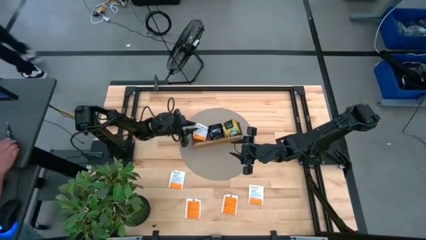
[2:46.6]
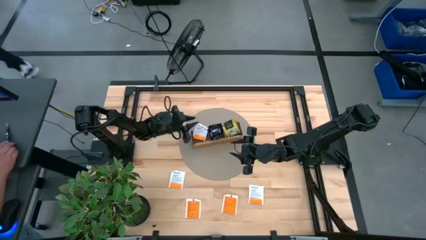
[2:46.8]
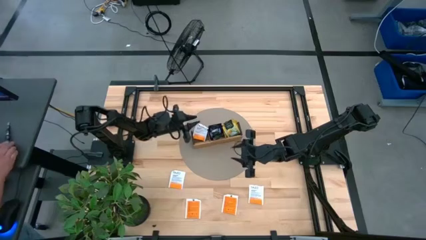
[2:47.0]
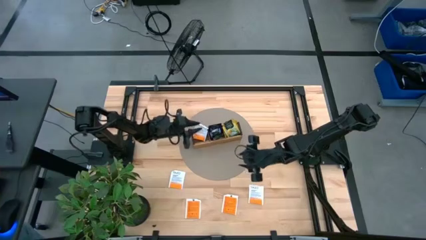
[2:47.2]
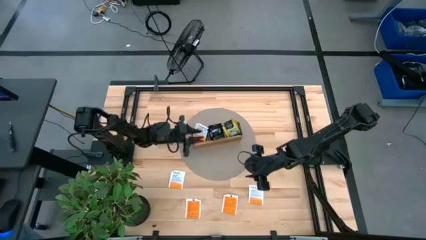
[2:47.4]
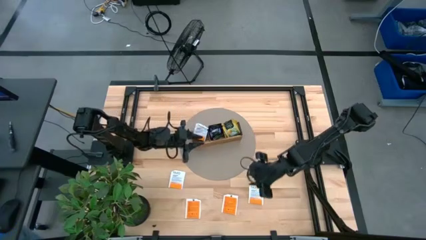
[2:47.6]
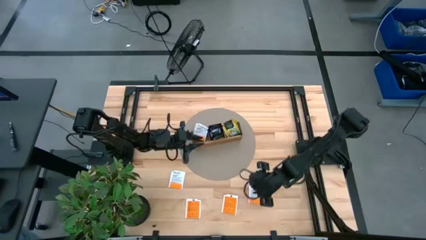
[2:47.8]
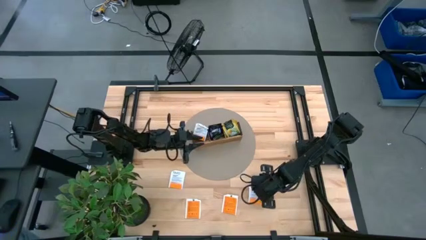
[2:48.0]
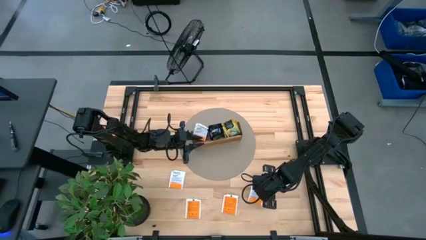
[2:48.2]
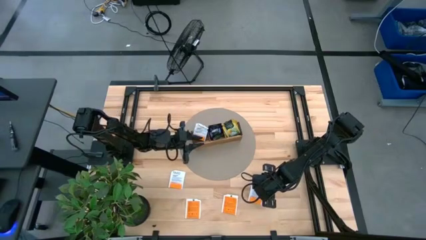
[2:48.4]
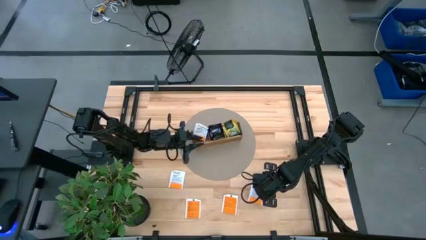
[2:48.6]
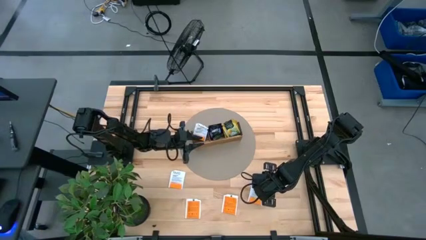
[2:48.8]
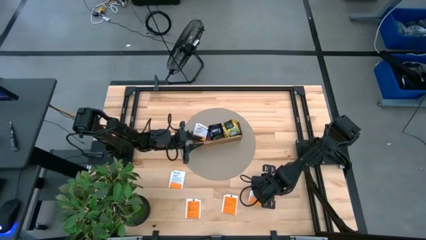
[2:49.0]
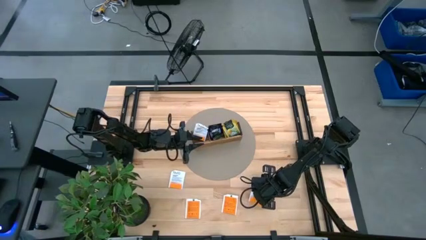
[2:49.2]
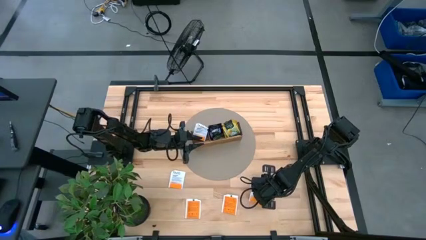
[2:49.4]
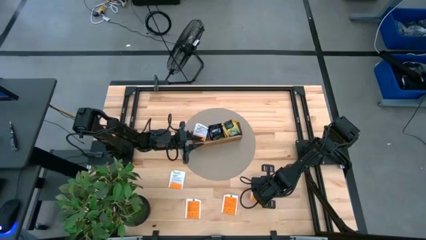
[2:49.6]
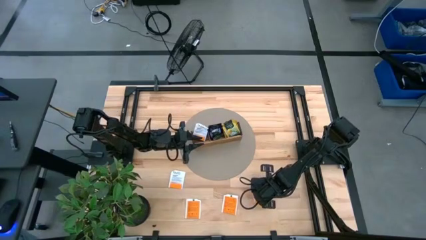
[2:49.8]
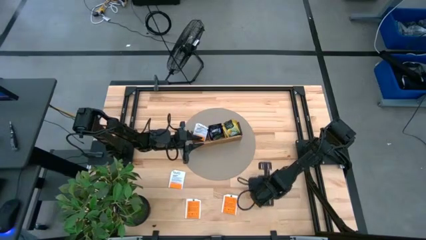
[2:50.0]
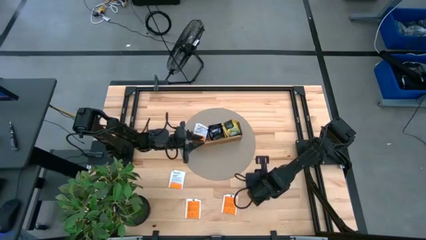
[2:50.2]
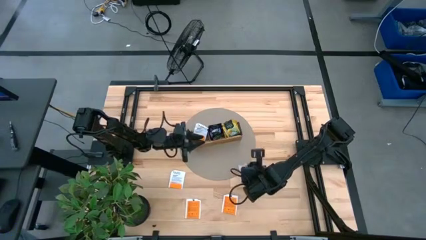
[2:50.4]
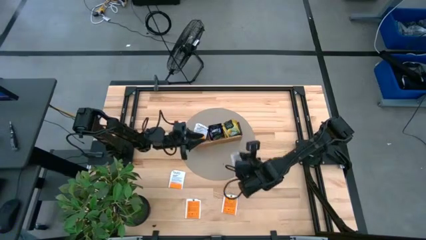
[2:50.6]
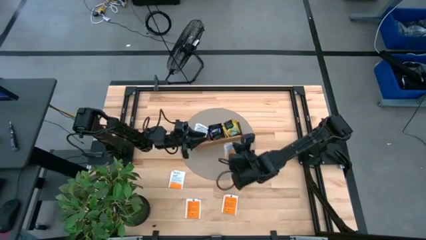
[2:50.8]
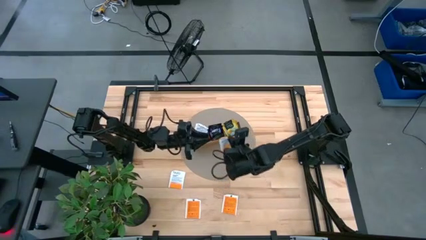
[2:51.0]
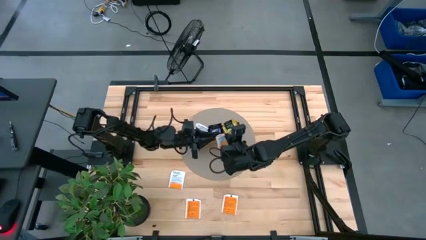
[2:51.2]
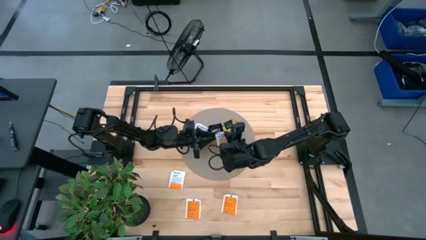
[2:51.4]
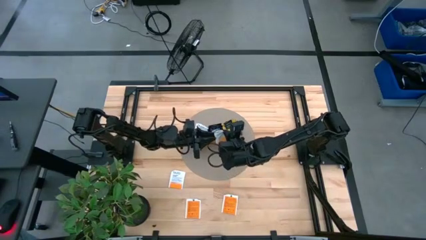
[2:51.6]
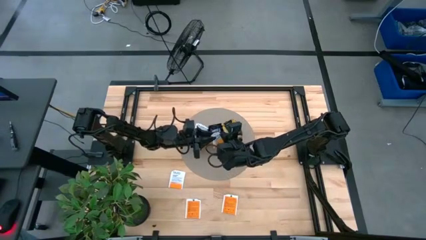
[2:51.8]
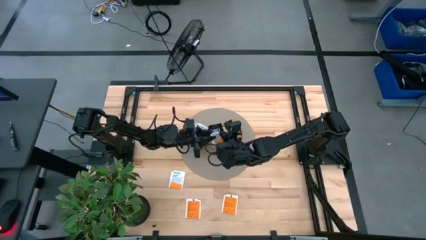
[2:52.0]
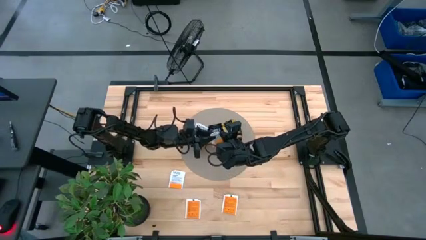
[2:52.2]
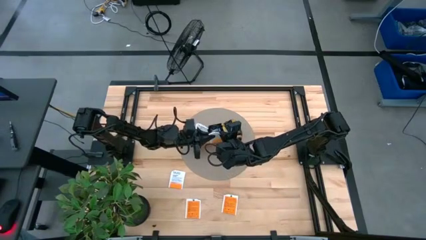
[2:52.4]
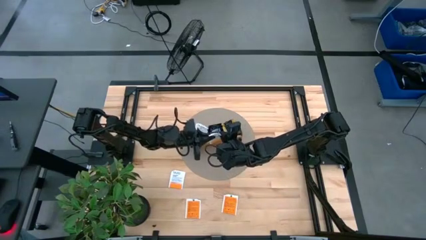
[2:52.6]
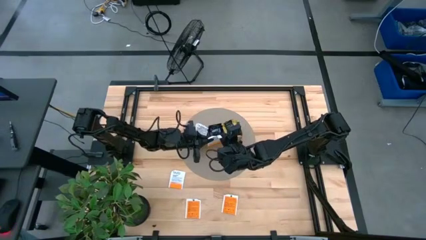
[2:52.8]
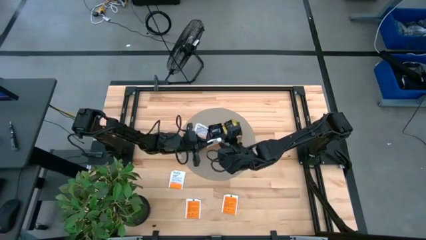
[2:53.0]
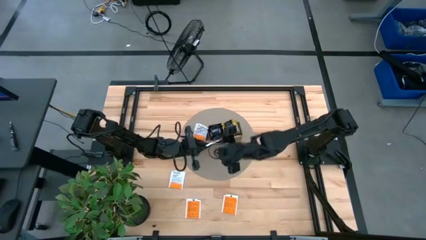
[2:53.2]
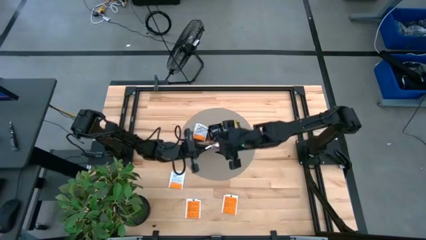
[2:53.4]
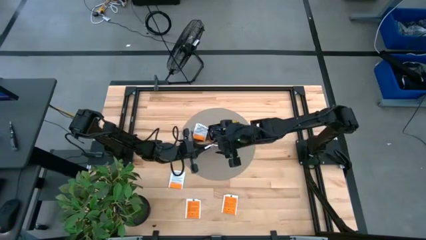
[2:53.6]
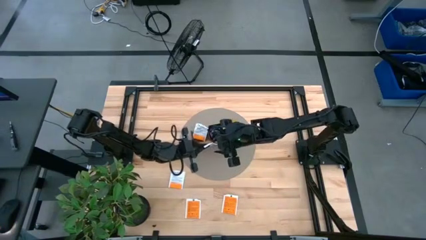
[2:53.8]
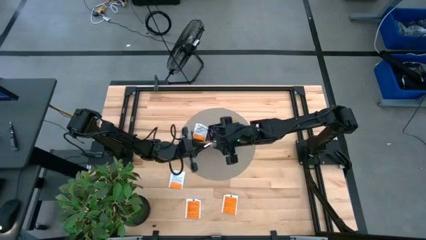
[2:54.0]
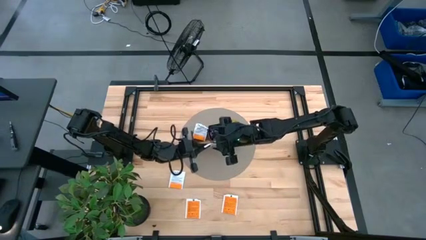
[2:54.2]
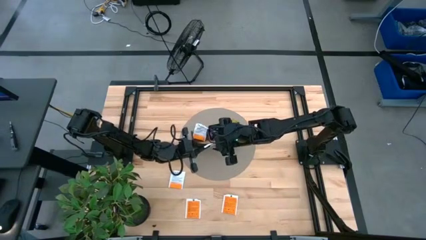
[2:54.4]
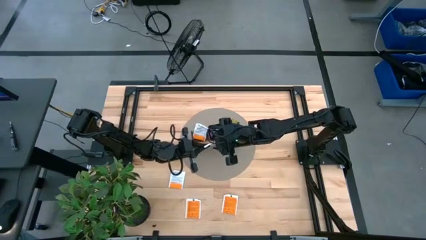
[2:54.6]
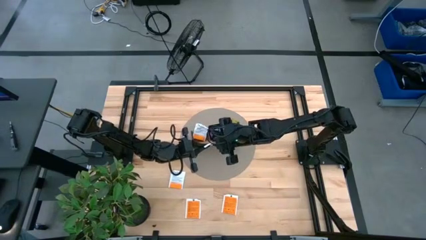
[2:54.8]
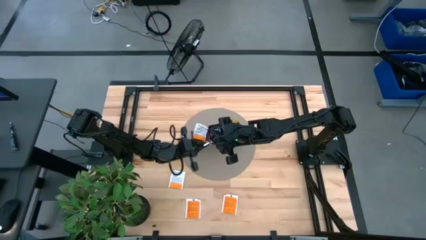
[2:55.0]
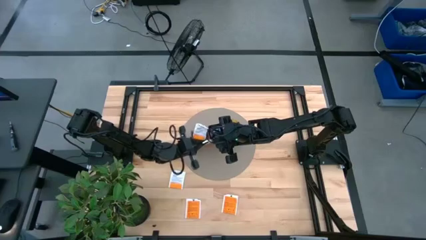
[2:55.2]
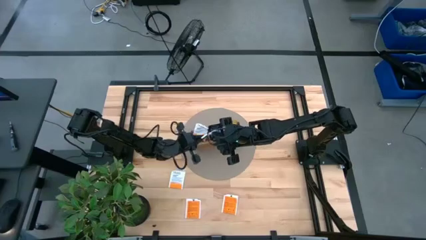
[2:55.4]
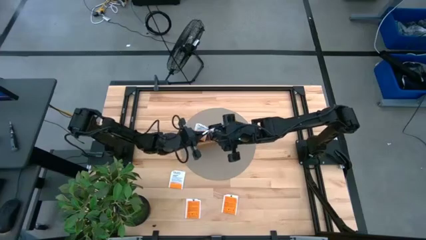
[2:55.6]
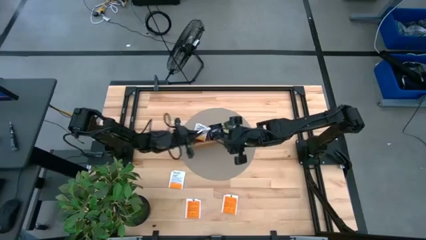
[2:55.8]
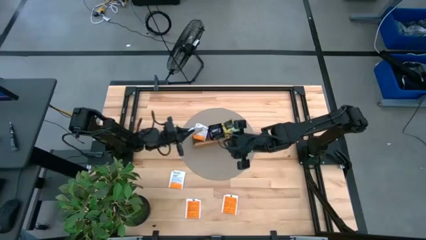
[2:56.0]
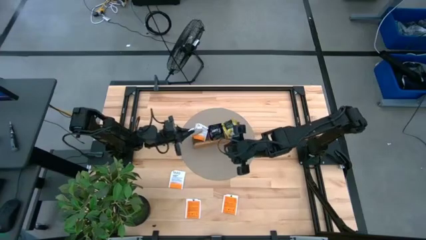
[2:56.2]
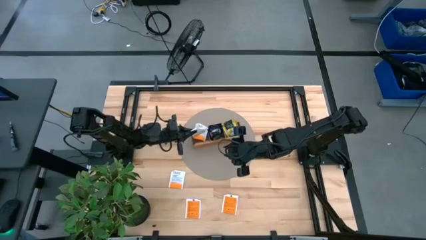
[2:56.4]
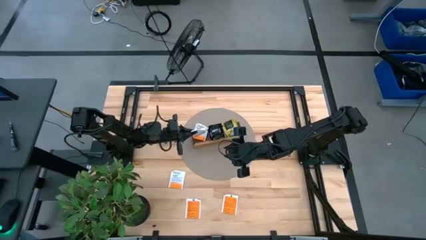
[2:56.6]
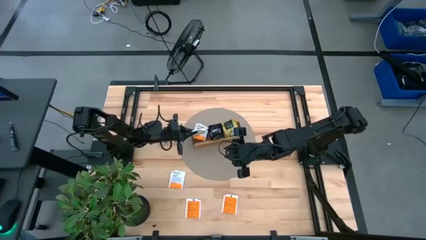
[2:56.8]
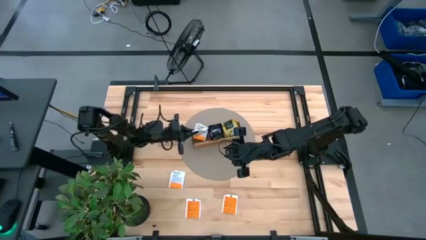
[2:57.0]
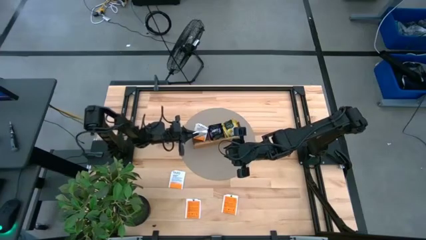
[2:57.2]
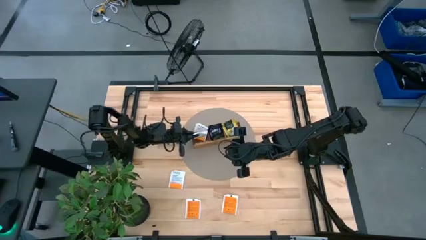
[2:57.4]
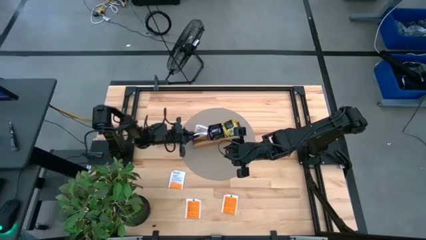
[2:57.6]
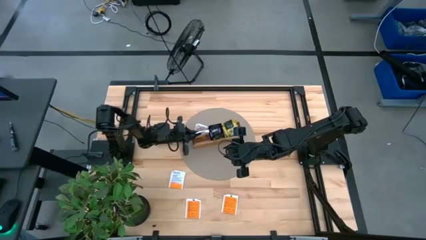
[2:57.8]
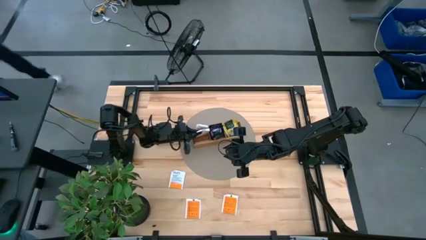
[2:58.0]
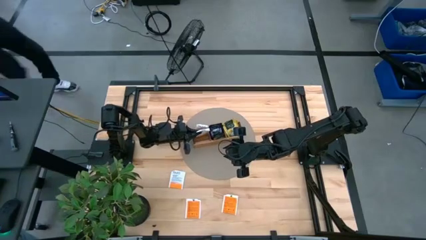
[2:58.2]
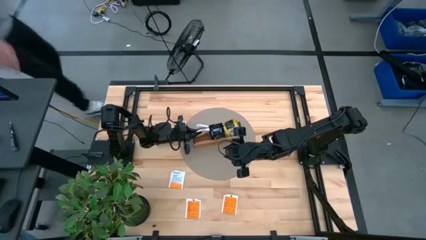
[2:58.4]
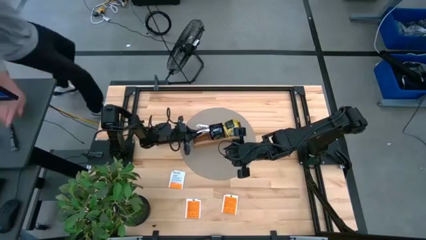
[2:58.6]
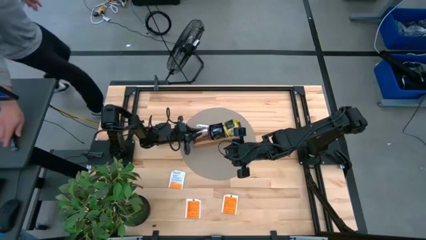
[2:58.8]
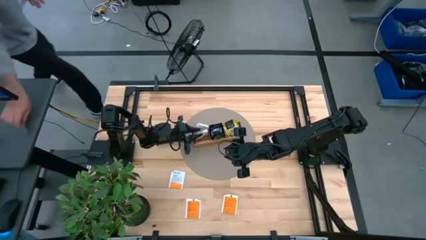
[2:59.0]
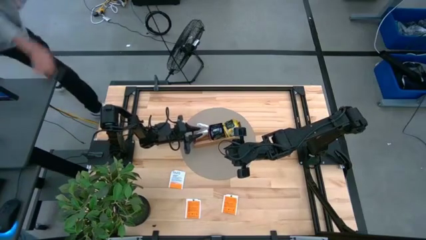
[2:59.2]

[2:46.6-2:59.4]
Task: Pick & Place Tea
Put the white tea bag into the left section of the wooden organizer

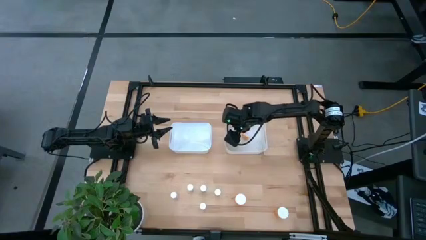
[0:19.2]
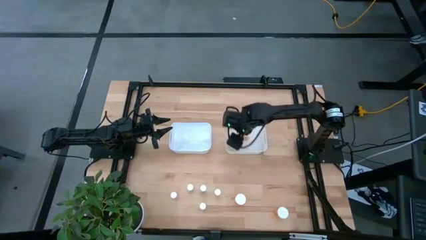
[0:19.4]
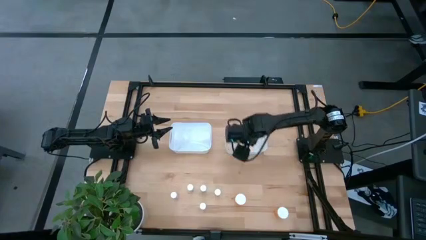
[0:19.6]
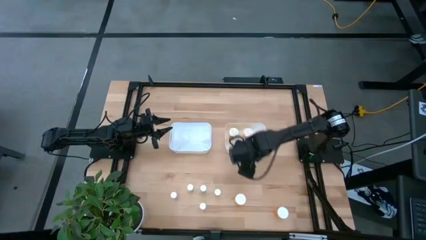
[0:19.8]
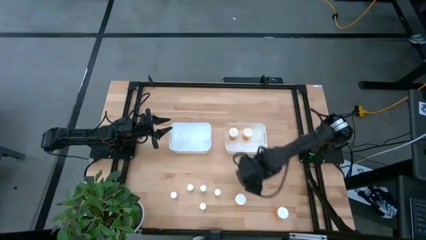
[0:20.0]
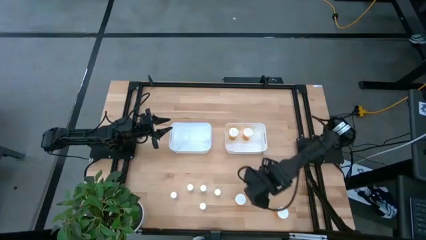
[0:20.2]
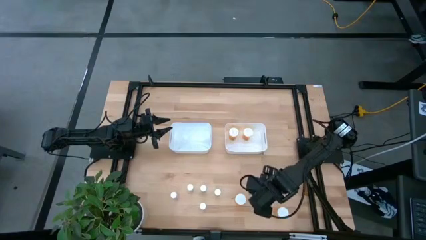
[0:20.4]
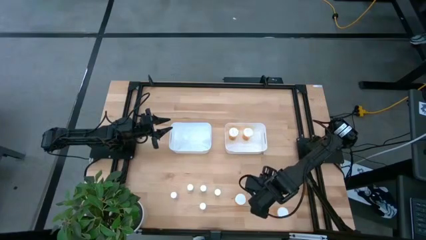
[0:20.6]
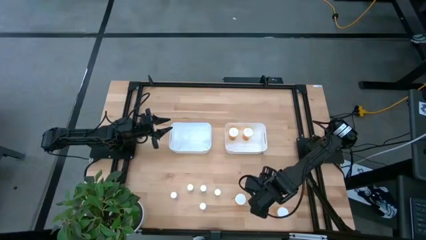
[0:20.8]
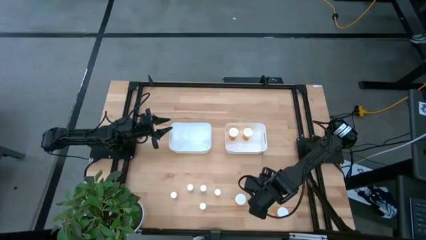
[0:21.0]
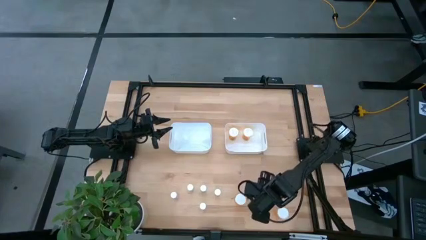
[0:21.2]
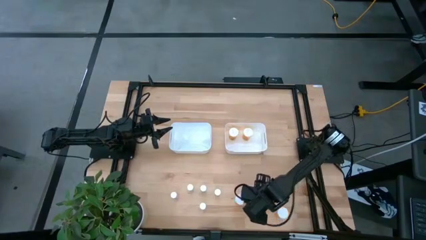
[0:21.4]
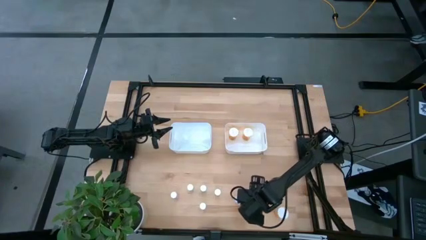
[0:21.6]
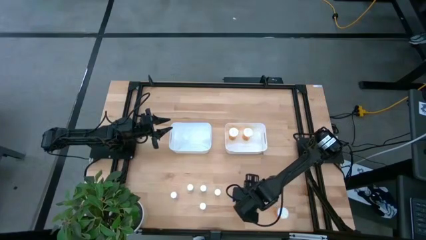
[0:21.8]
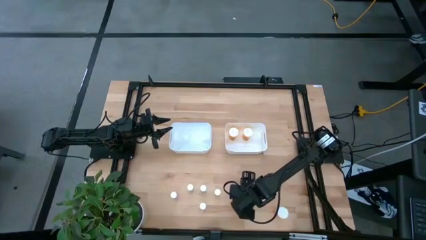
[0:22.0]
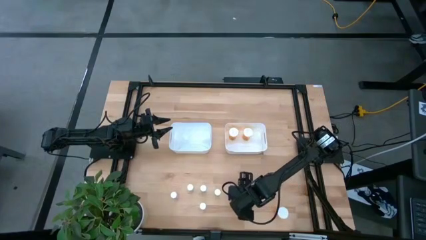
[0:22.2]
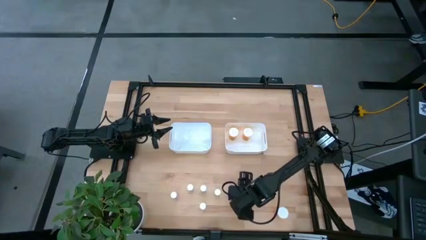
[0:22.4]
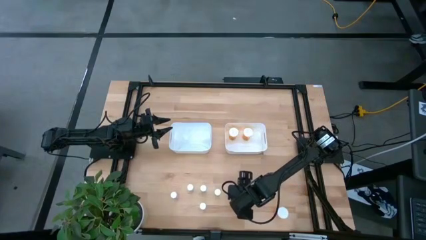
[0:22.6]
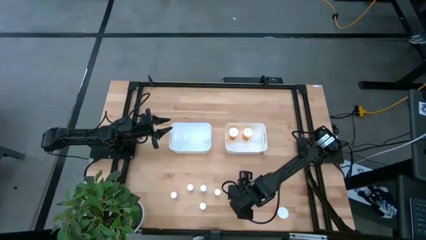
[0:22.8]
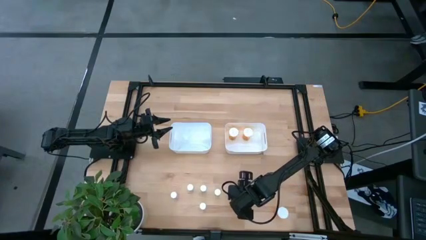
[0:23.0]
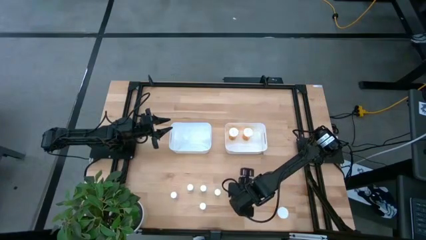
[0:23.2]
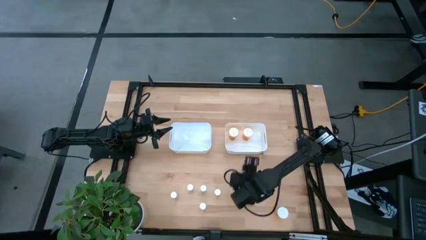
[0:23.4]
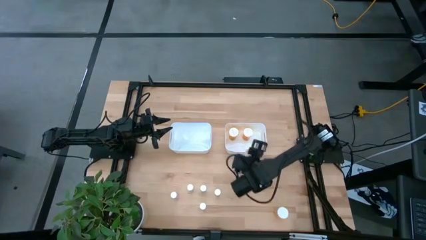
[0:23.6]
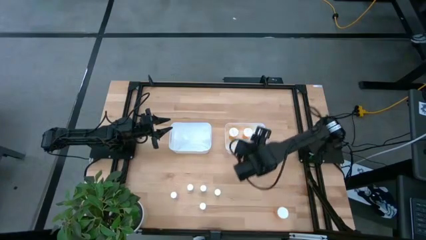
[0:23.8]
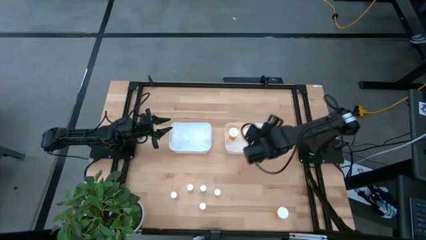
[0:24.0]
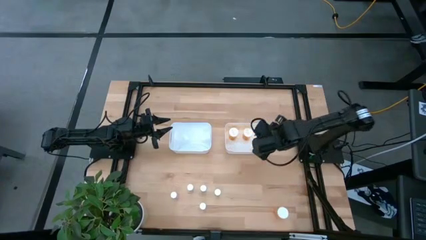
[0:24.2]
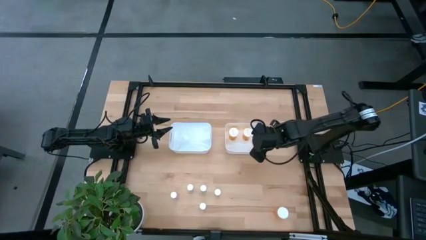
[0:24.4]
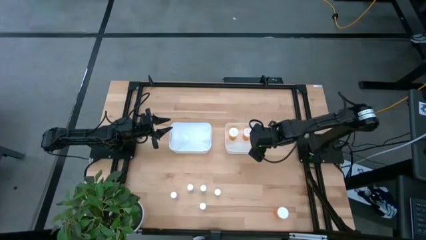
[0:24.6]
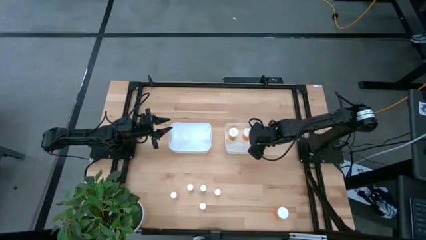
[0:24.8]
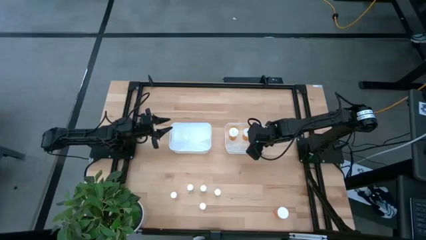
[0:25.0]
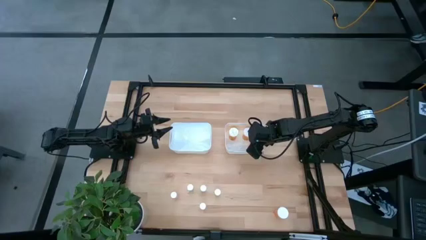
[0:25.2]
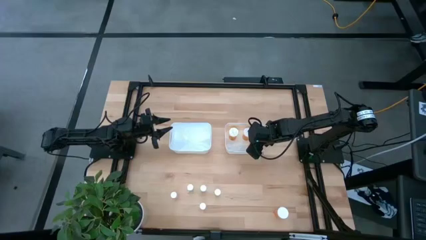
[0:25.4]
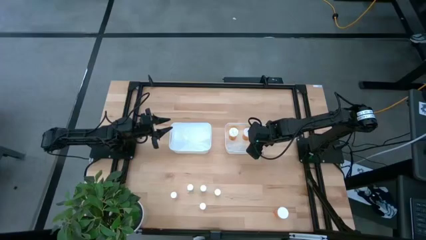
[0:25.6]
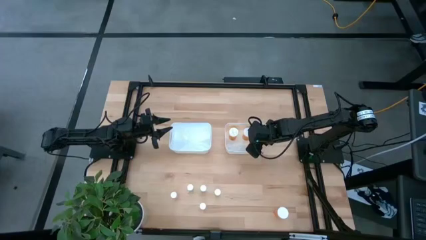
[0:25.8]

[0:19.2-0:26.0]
Task: Pick and place medicine bottles into bin by pill shape (circle, oval)
Put the large orange pill bottle into the right white bin
